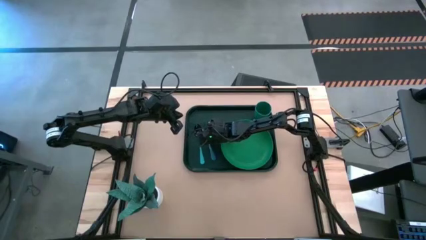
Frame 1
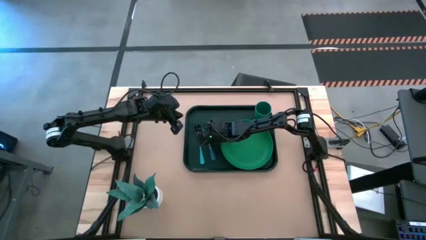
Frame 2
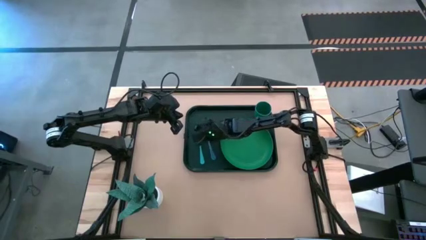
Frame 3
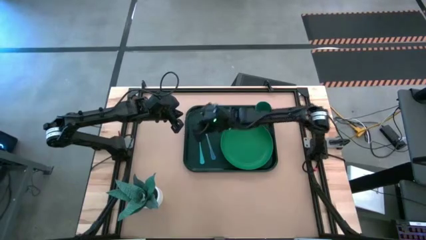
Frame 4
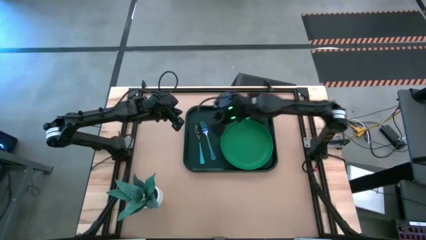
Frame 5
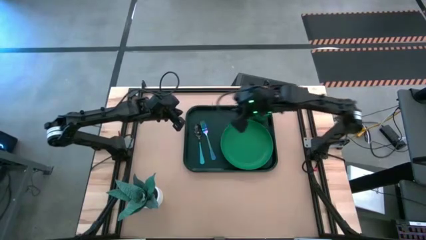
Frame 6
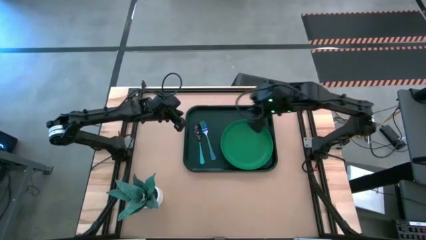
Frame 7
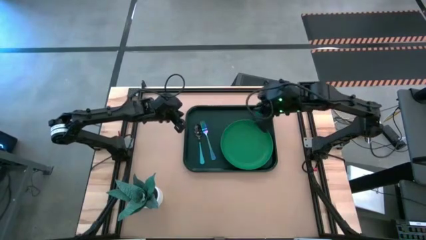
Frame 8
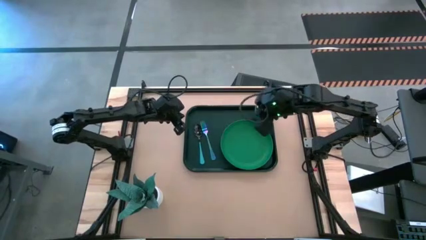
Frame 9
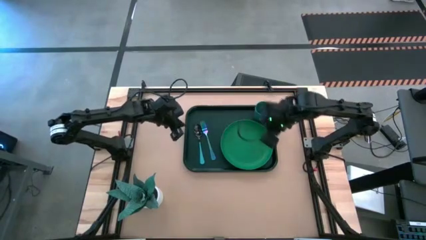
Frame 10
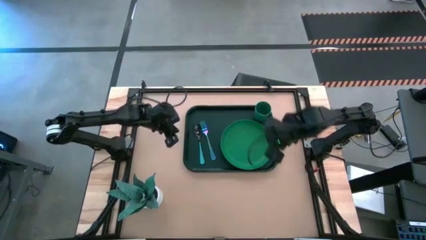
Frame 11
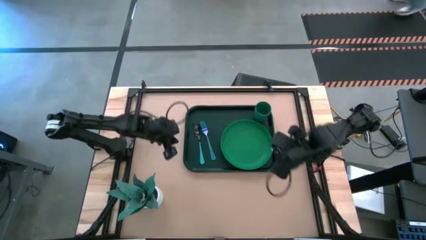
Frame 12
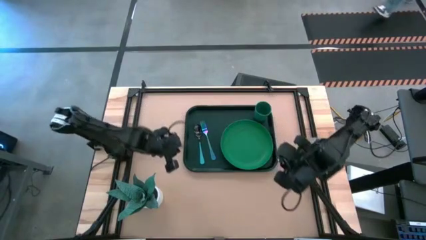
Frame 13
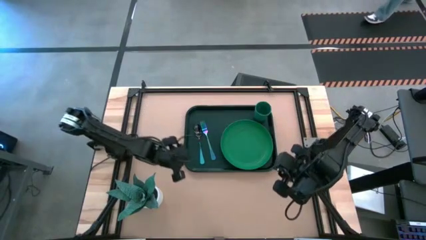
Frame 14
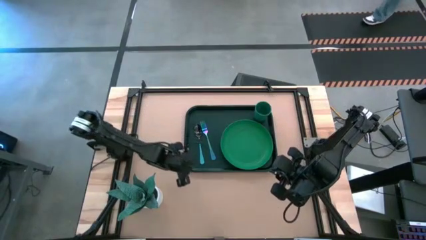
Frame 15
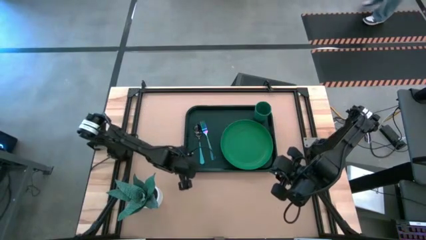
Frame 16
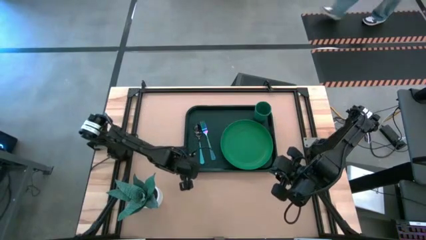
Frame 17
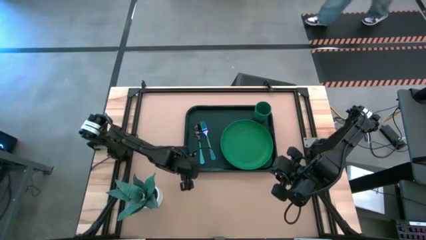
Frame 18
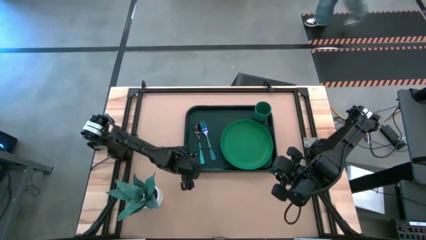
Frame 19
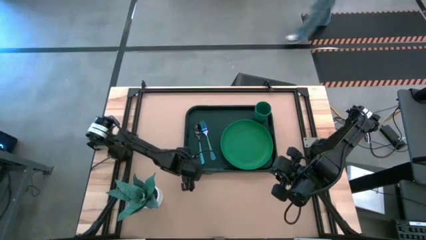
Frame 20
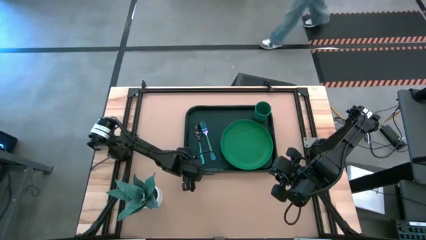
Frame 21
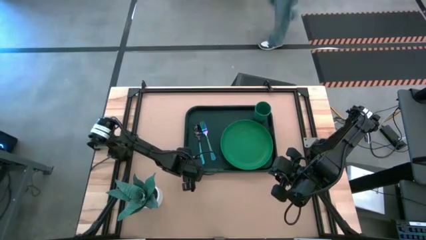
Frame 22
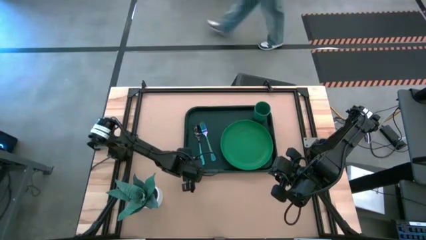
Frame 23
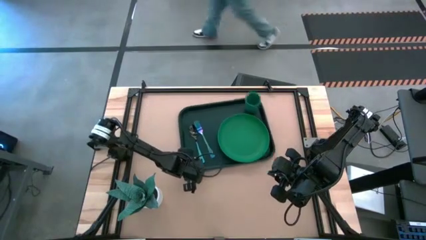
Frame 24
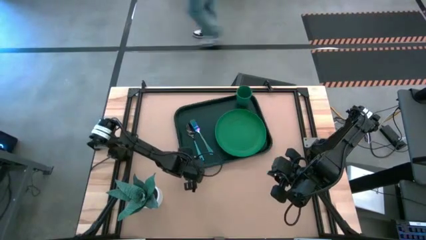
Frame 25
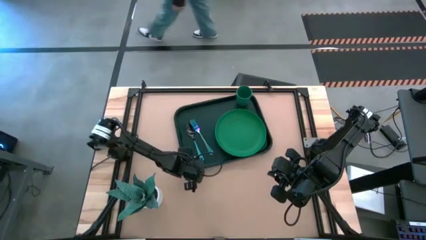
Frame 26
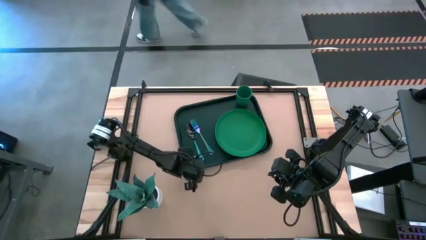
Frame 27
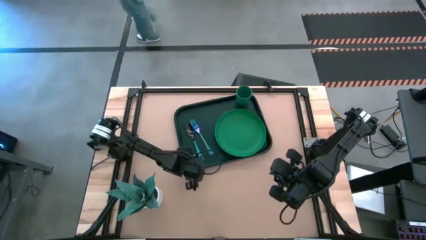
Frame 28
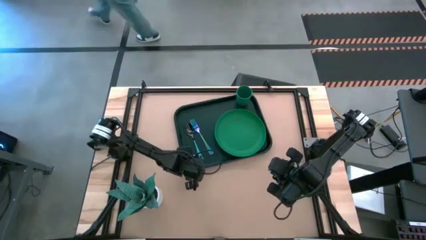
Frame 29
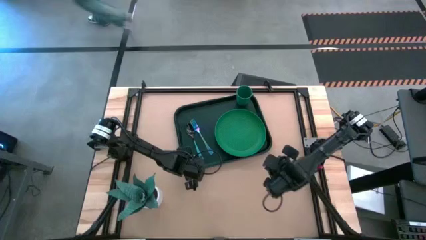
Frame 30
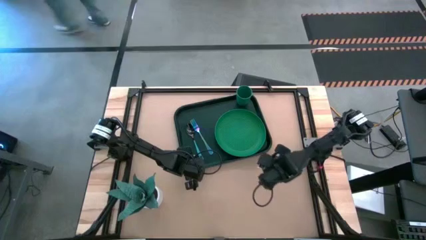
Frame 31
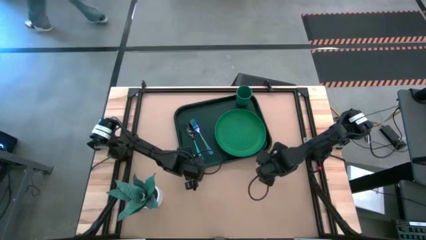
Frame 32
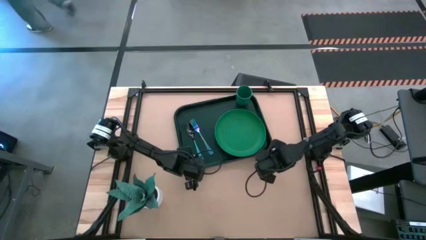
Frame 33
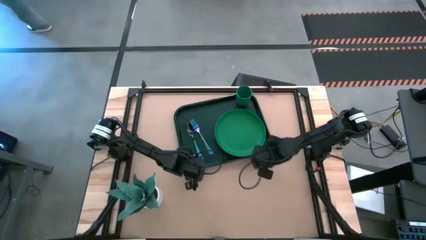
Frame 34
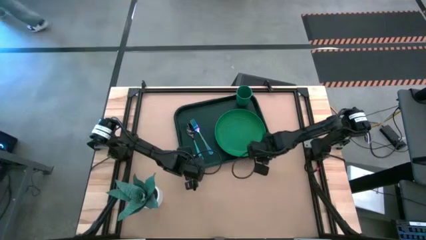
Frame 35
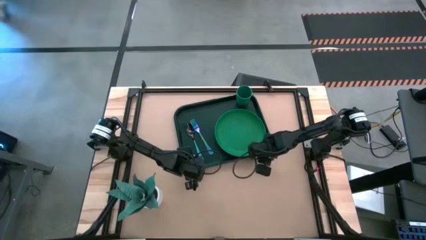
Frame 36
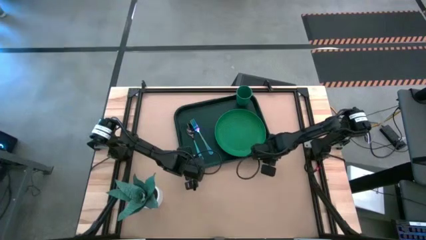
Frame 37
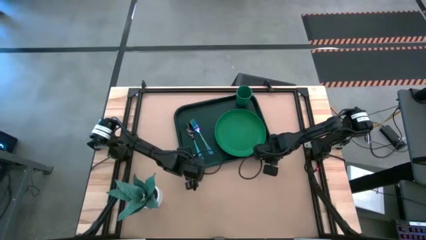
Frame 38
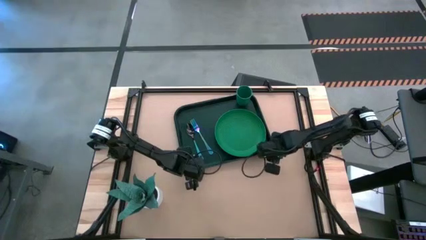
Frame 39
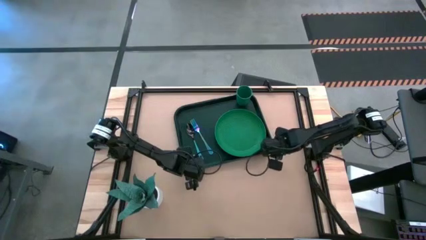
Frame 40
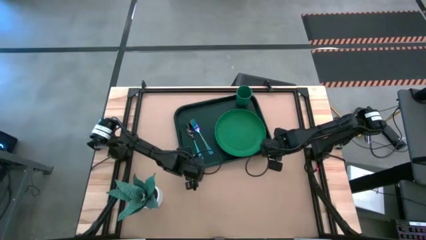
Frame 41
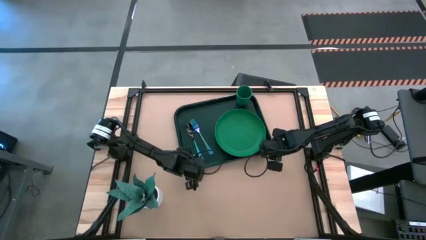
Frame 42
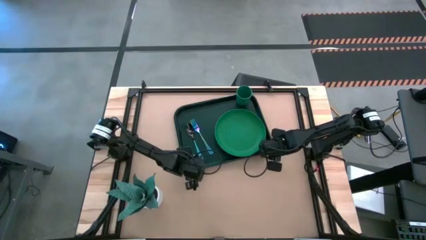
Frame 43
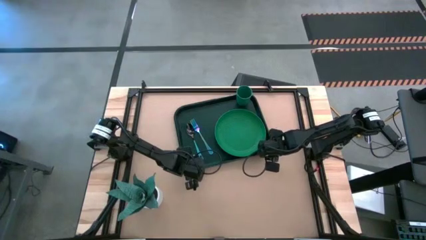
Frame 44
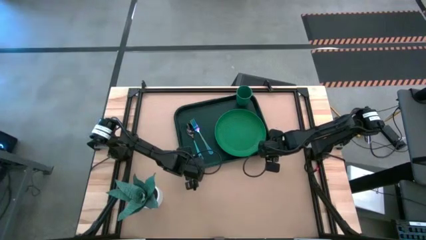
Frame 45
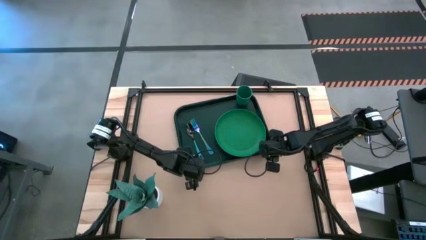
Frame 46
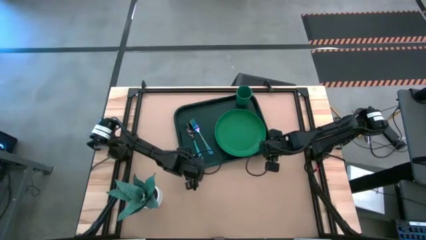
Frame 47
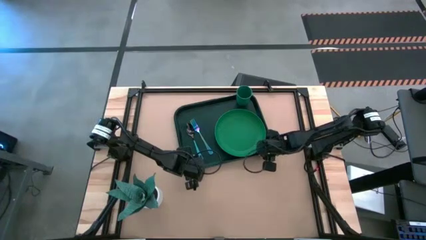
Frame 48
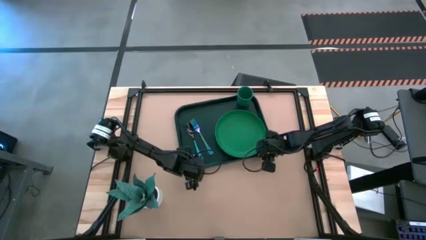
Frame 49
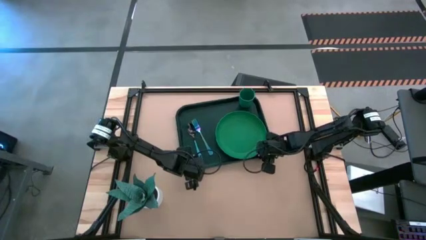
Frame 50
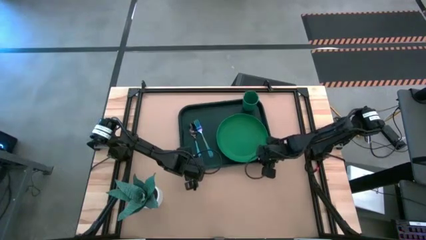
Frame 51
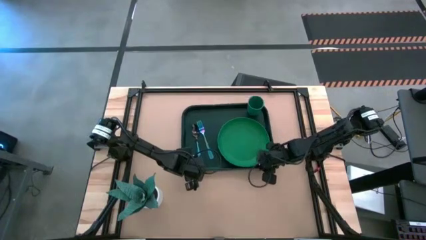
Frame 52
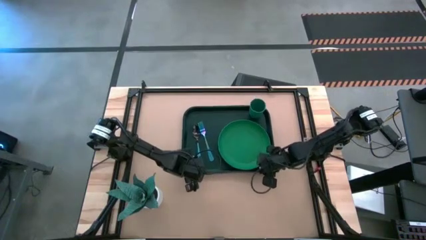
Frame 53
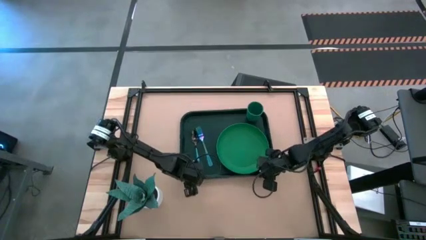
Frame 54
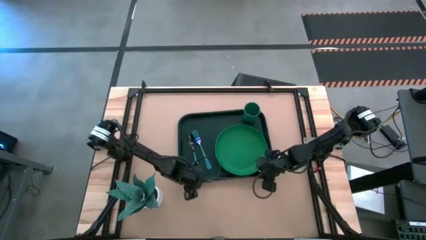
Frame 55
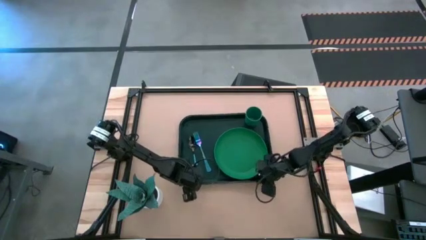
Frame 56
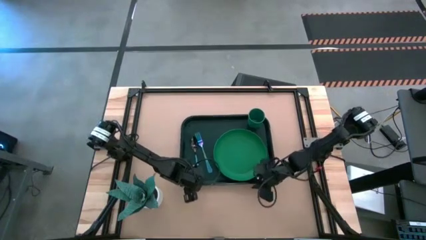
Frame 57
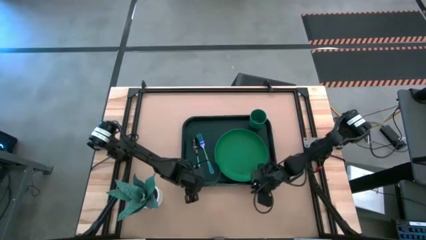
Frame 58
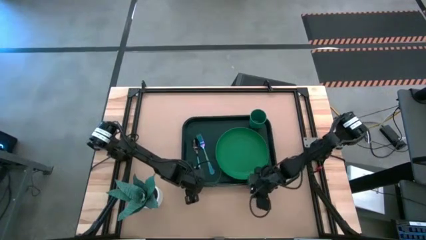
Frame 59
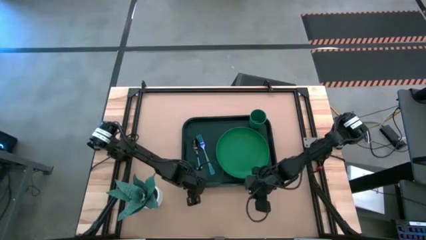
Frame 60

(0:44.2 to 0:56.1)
Task: Pick and place plate/cup/fork/spoon on tray
Adjust the dark green tray

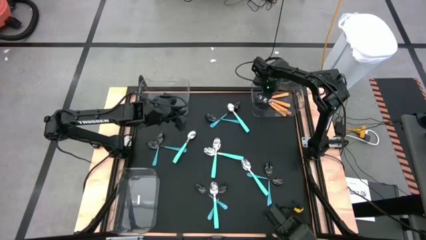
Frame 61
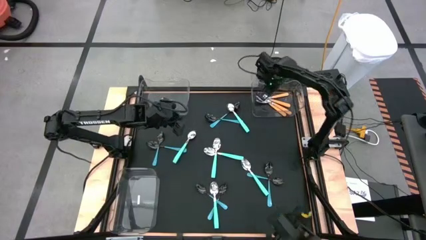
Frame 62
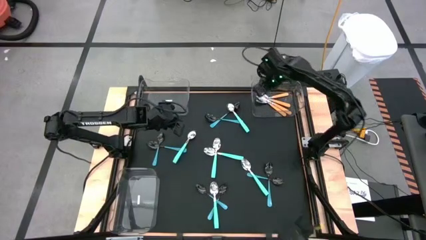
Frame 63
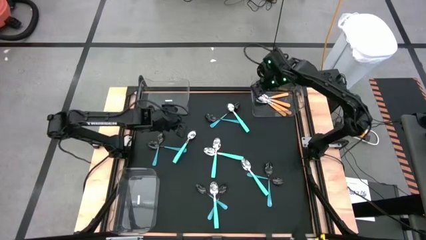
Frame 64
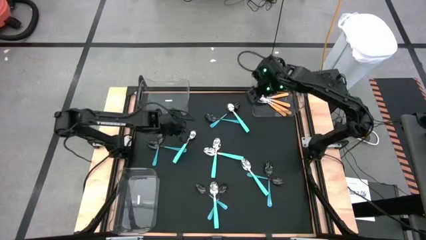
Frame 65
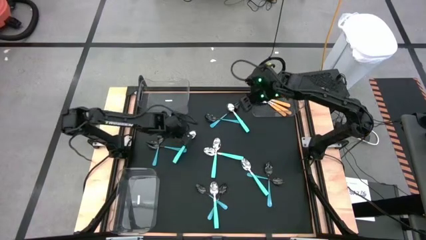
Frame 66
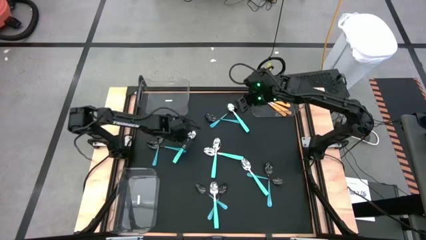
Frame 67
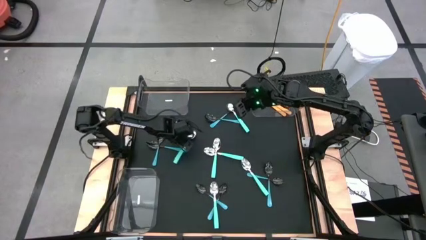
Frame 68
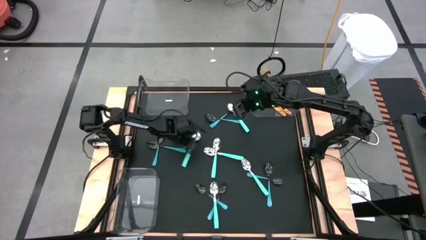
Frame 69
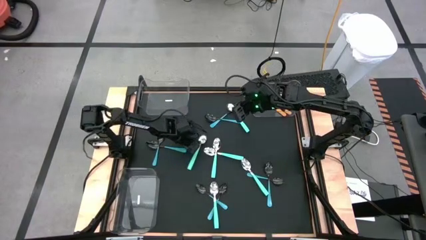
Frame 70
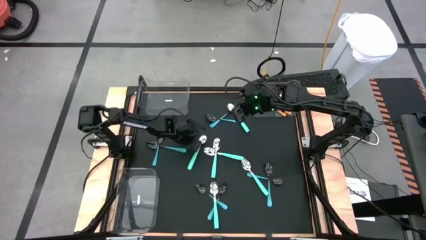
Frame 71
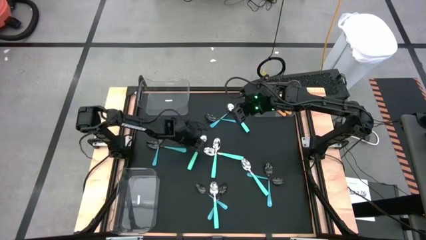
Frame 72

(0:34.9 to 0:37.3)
Task: Sort silverware by color (type)
Put the light blue spoon into the top left transparent bin

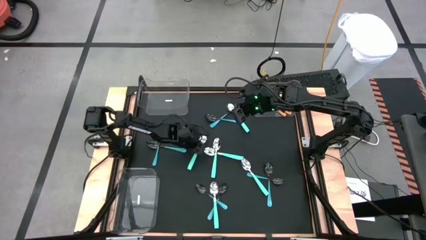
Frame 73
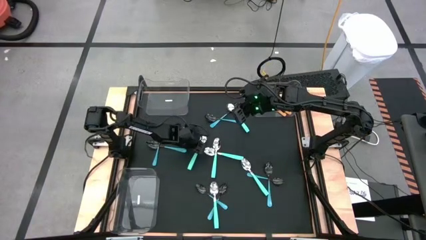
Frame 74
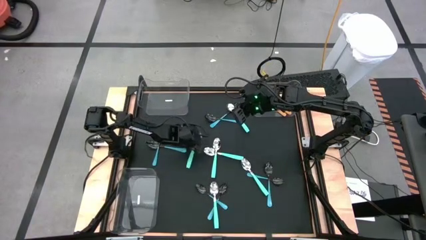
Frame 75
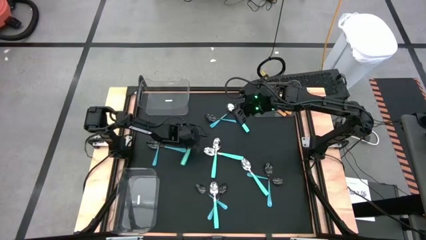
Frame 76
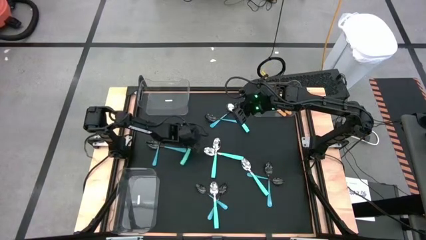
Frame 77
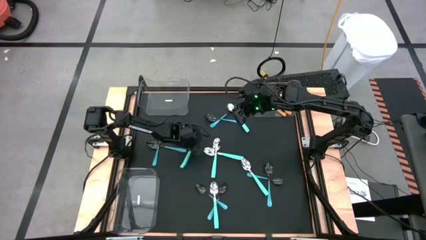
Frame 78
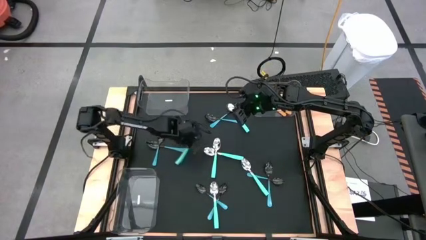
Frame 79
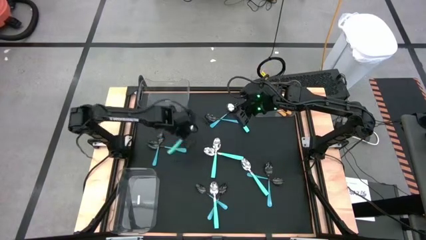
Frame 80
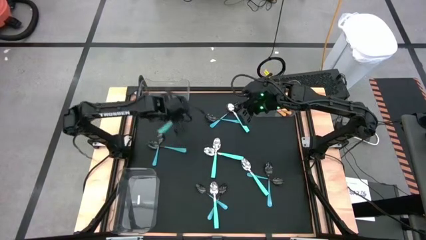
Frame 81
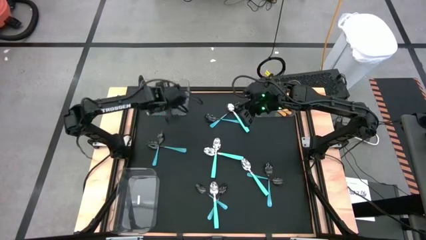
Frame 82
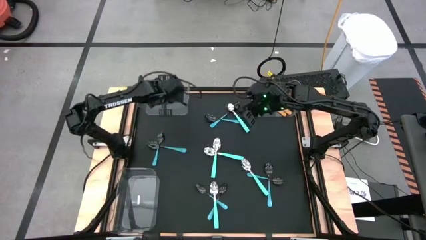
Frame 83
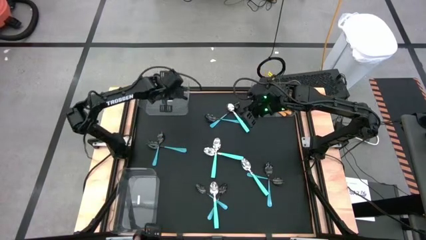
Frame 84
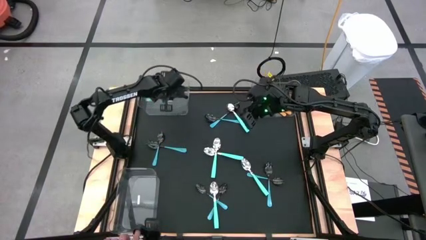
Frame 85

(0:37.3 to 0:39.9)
Put the light blue spoon into the top left transparent bin
